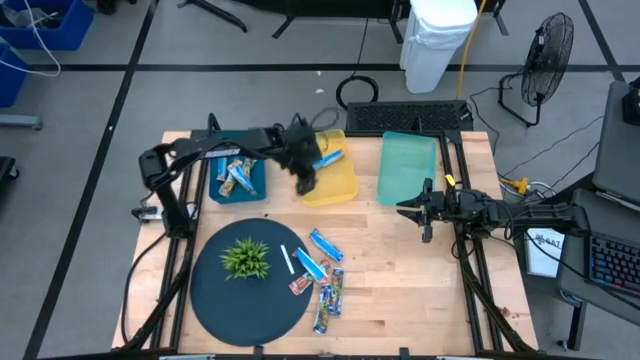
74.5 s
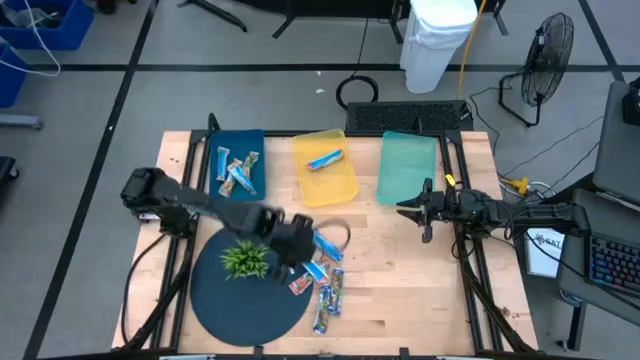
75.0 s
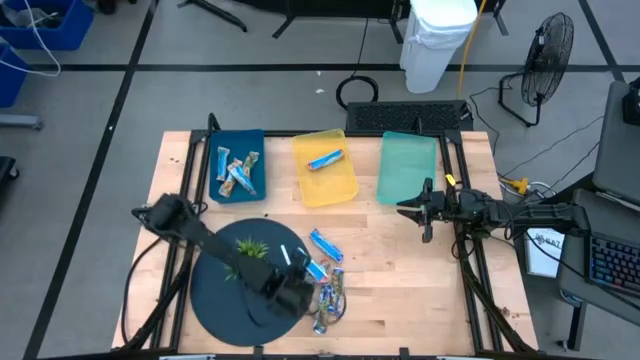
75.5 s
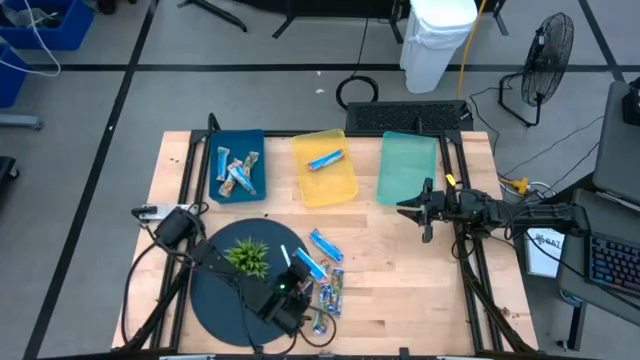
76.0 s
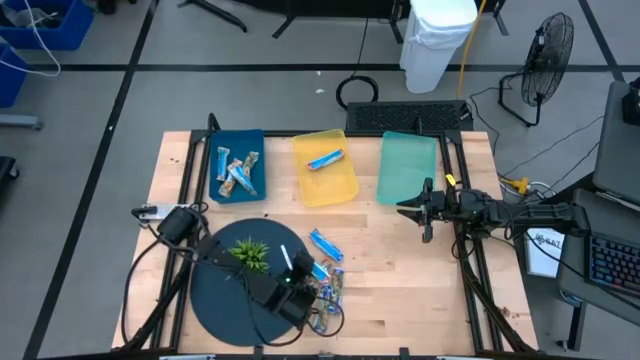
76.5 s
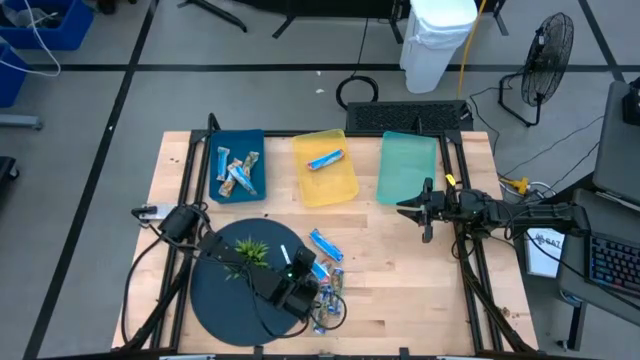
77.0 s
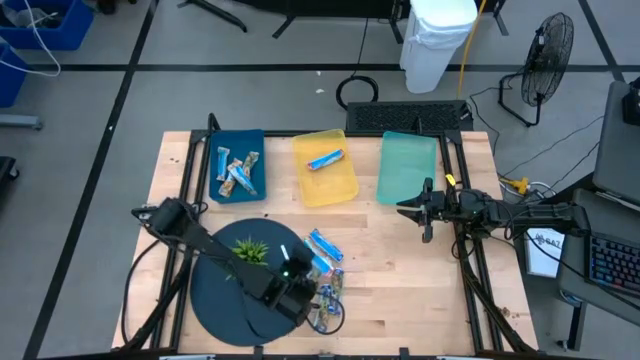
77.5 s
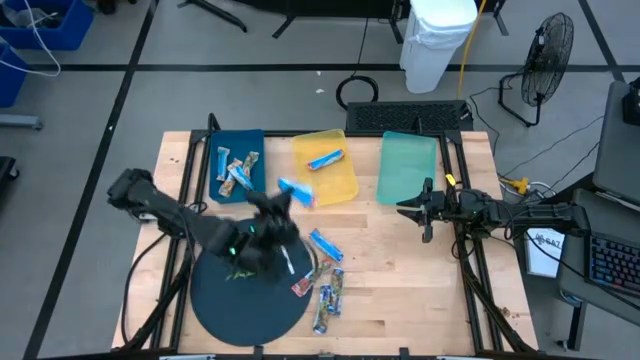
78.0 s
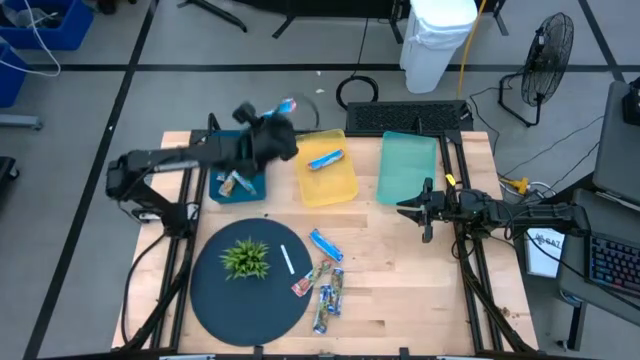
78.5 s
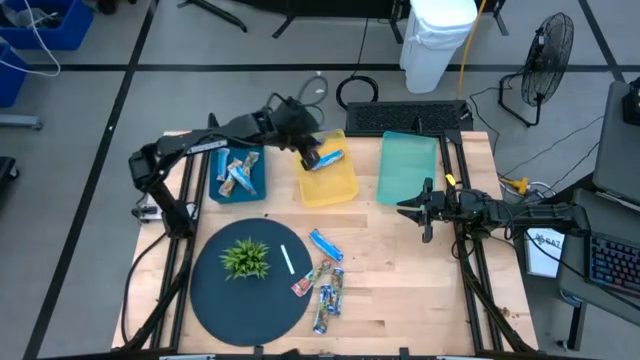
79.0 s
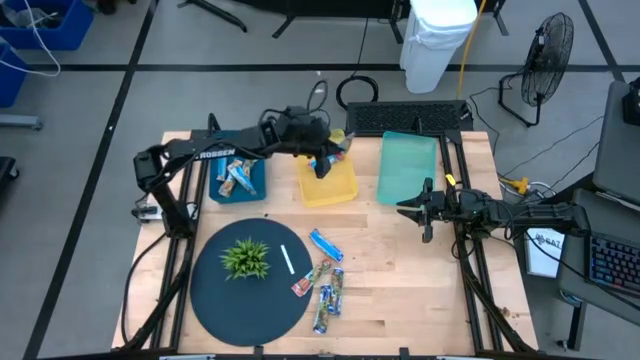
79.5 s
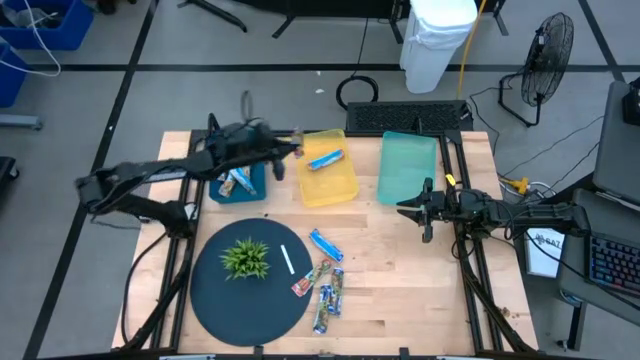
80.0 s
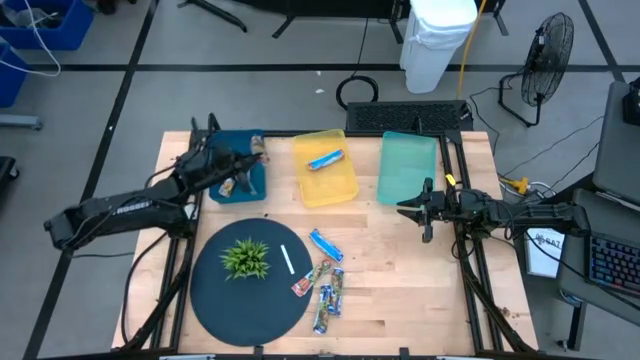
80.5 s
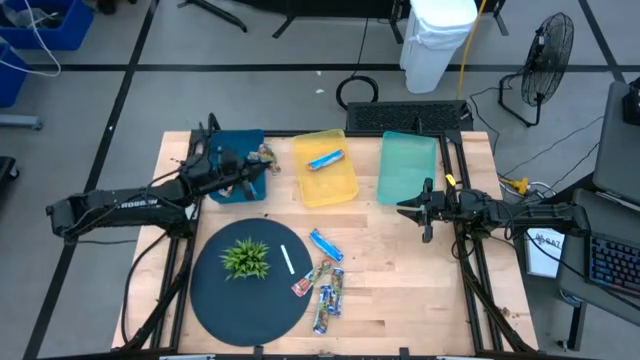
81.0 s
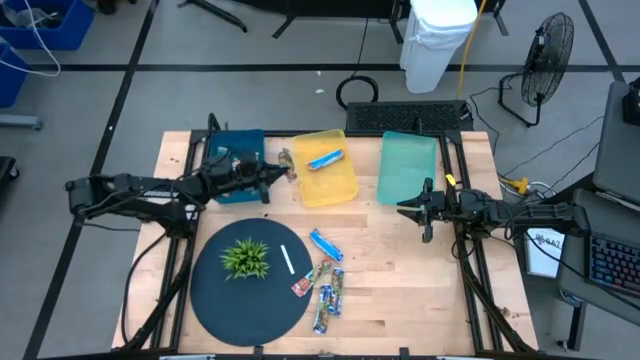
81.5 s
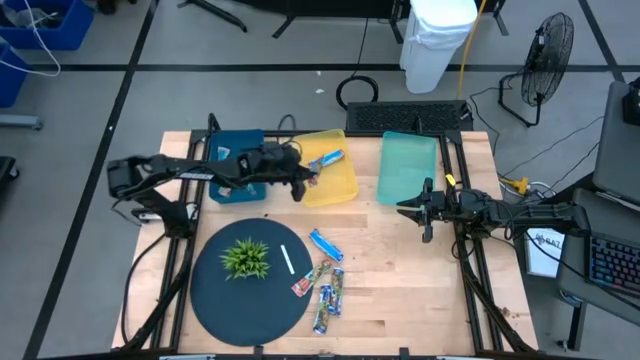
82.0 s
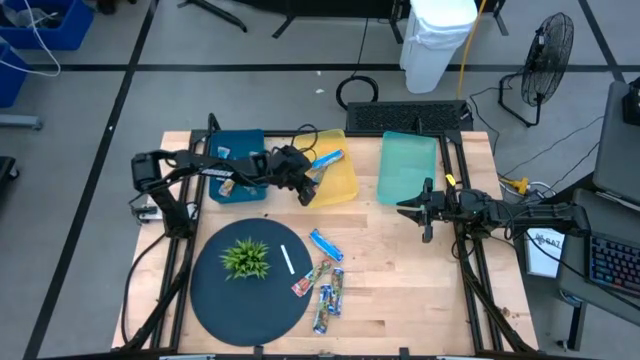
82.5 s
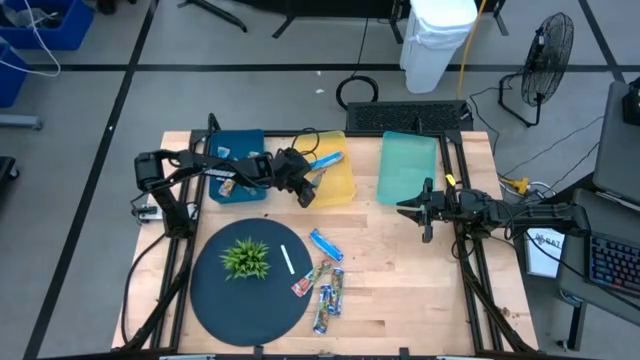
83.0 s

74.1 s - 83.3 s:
Task: Pick and place Granola Bars by type
Put the red granola bar into the yellow bin

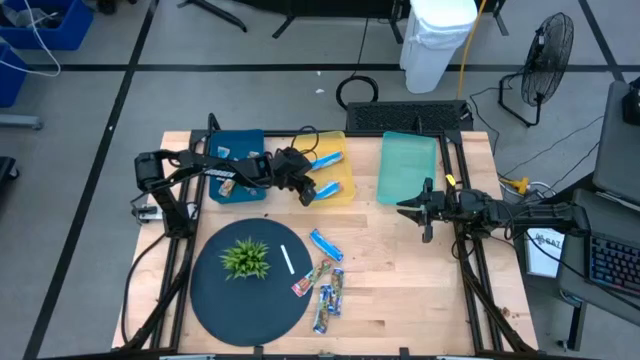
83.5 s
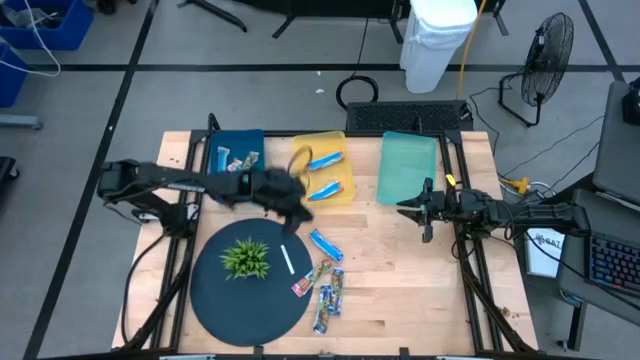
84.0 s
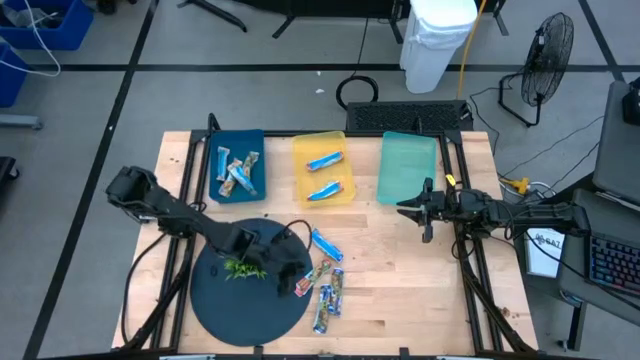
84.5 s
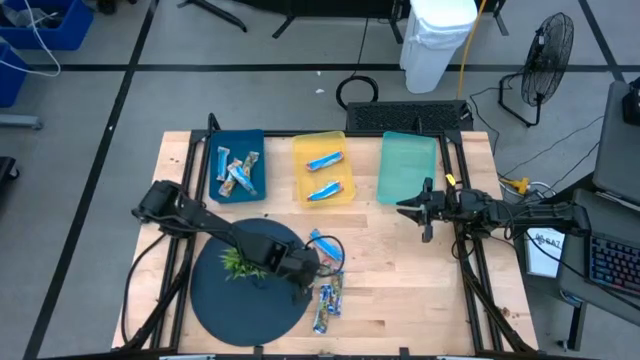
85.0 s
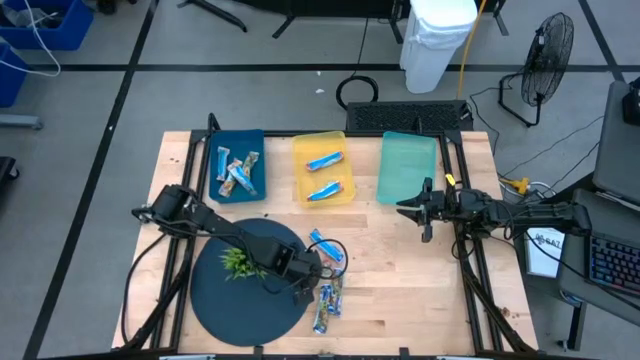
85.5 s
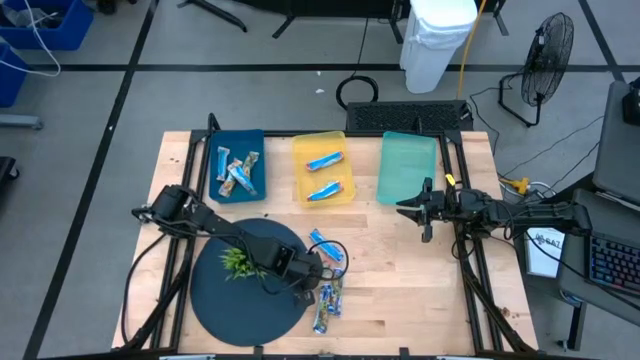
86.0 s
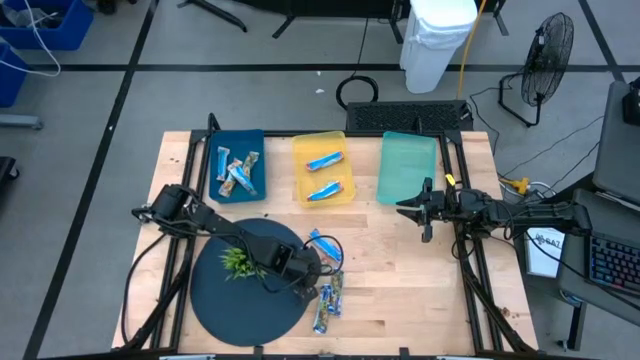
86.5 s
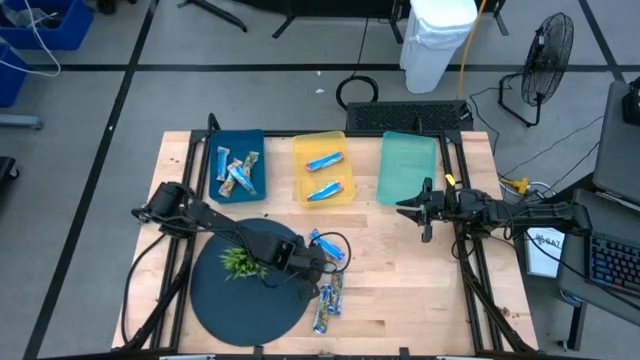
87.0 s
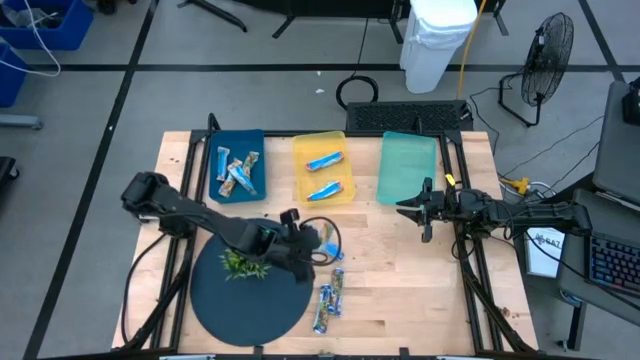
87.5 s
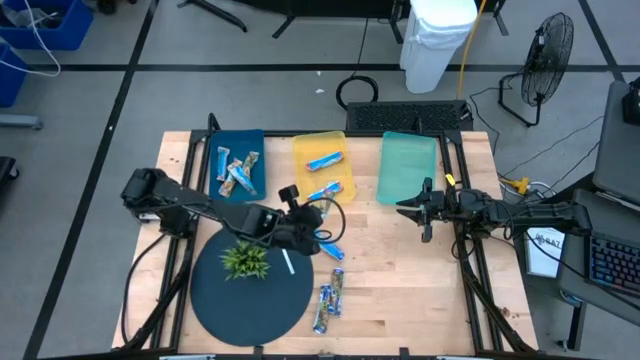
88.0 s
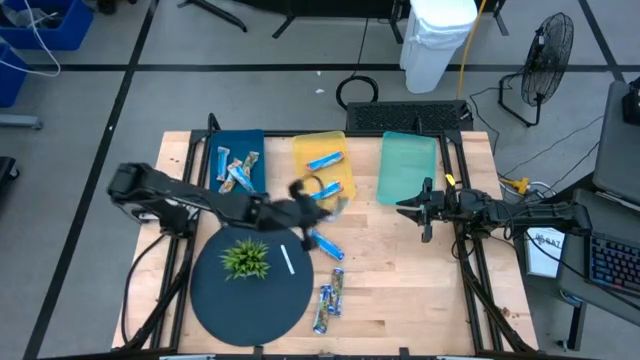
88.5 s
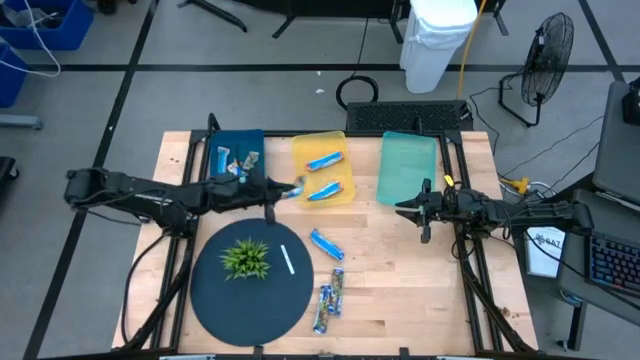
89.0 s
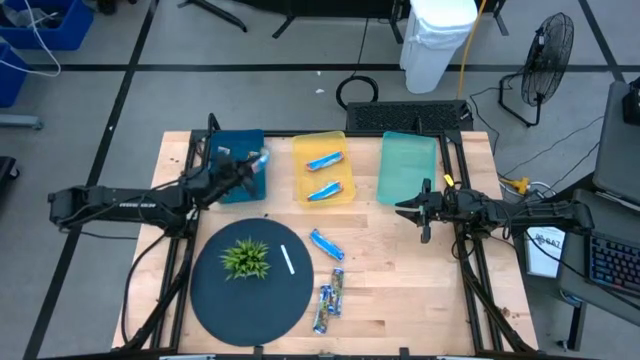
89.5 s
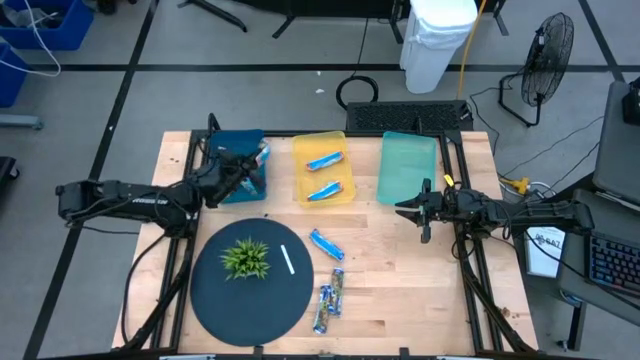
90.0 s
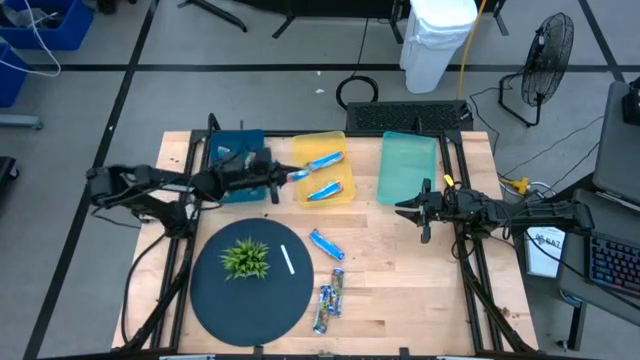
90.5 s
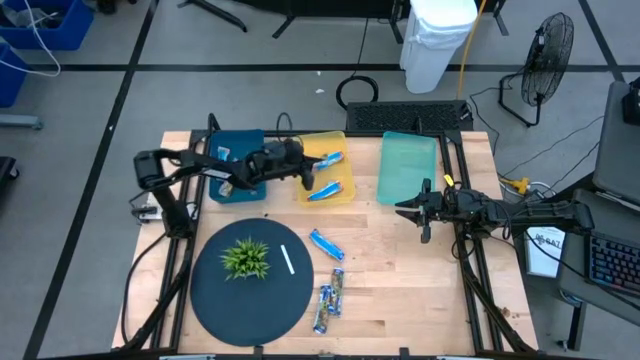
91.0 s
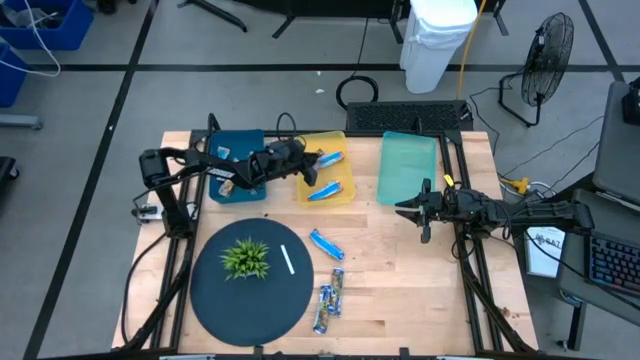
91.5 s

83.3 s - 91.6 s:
Put the red granola bar into the yellow bin

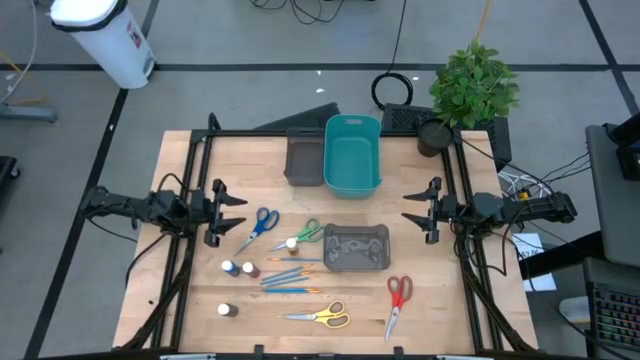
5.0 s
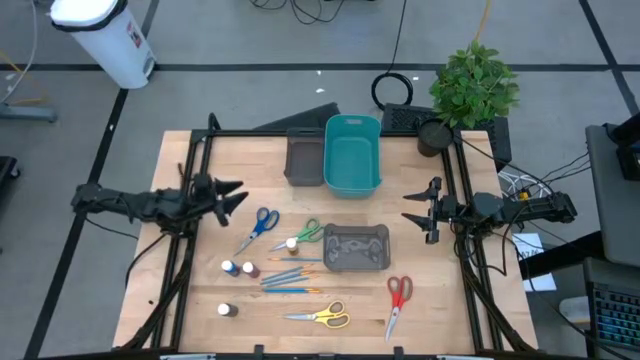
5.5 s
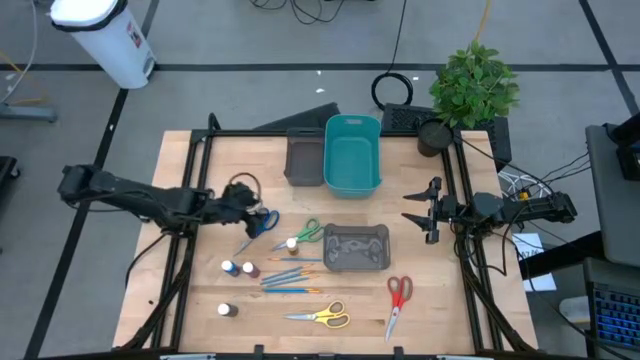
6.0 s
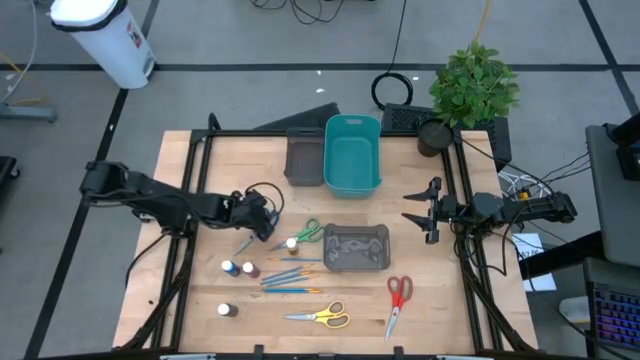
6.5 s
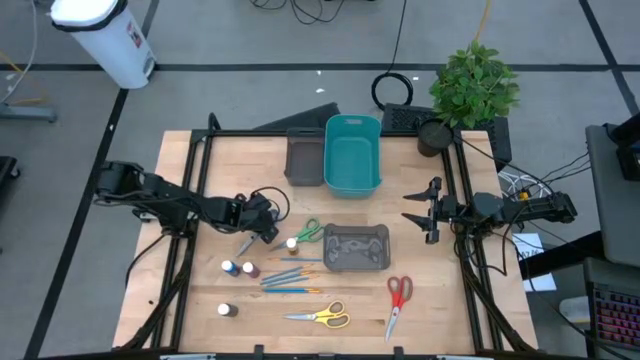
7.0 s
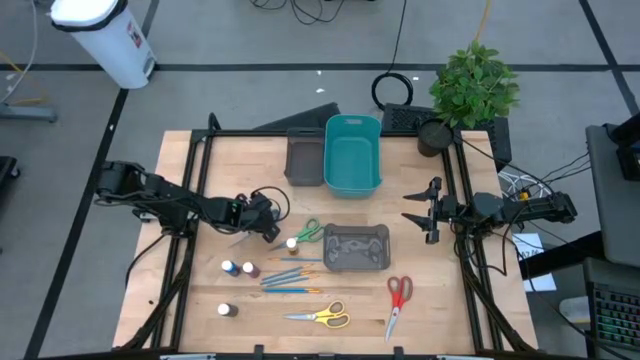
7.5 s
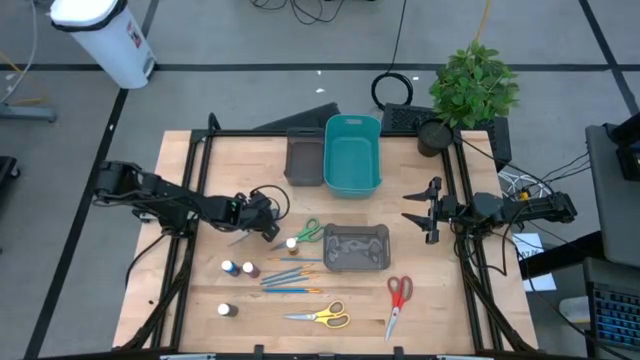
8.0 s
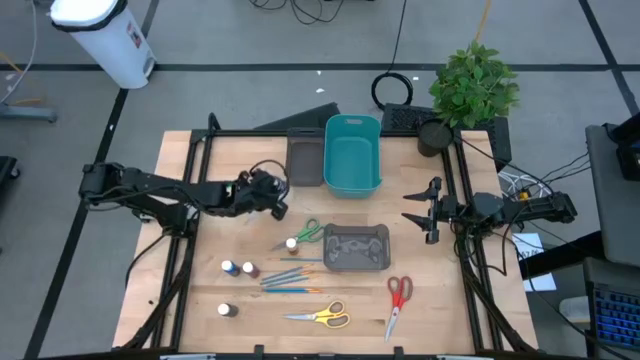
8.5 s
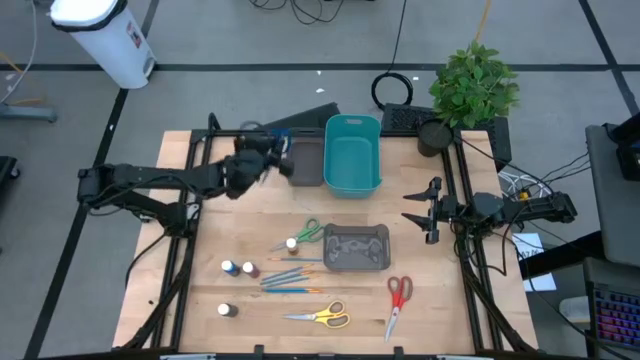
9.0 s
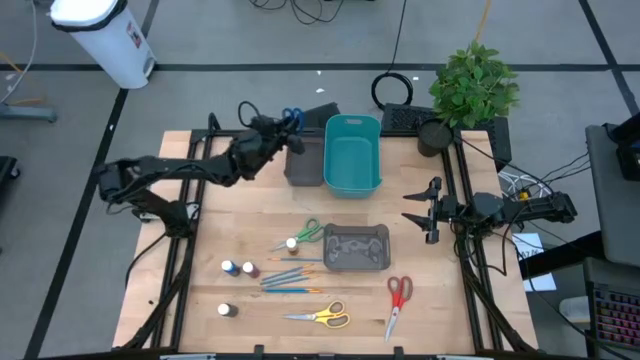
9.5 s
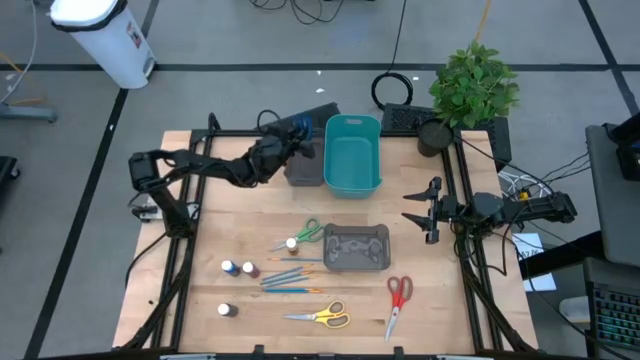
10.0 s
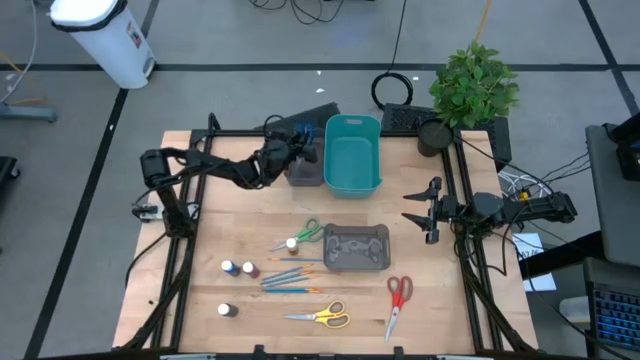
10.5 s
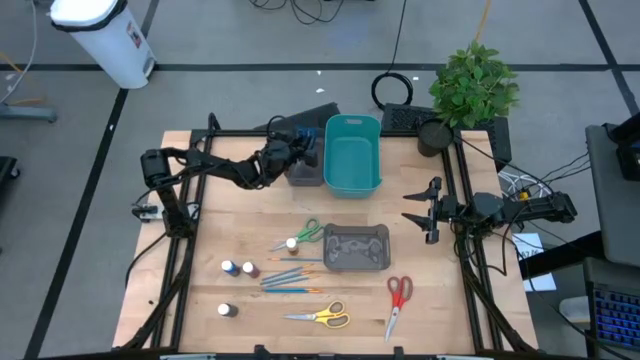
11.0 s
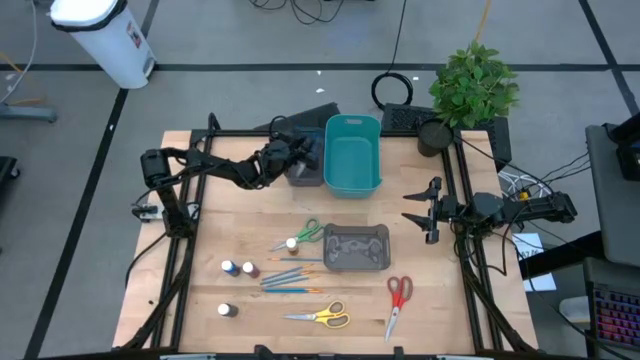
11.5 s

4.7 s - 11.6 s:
Task: Pick & Place Paint Supplies
Put the blue scissors into the top black bin
